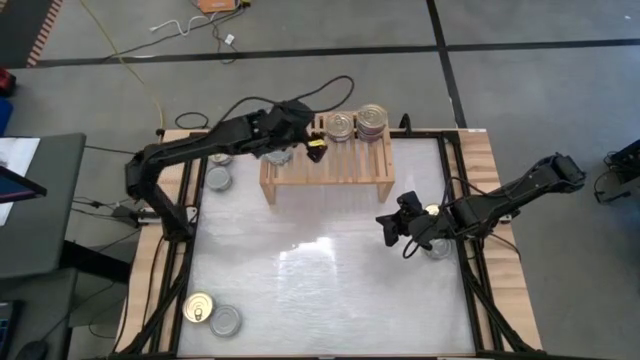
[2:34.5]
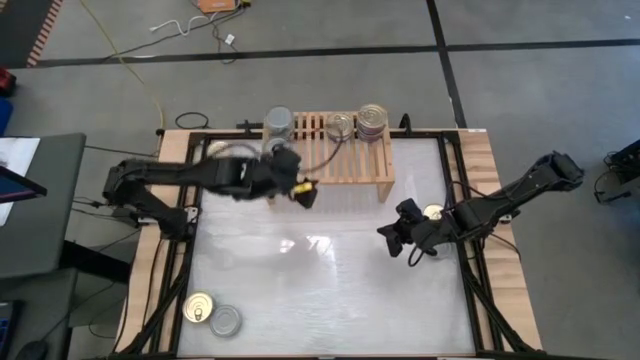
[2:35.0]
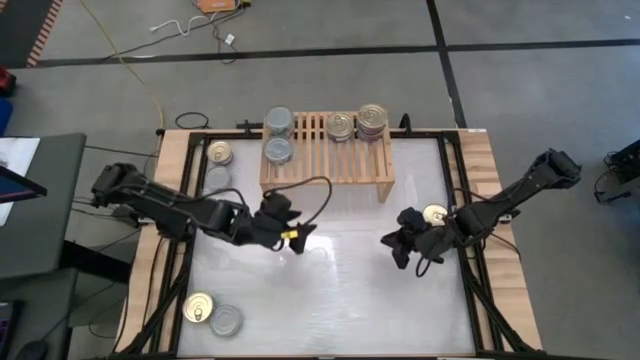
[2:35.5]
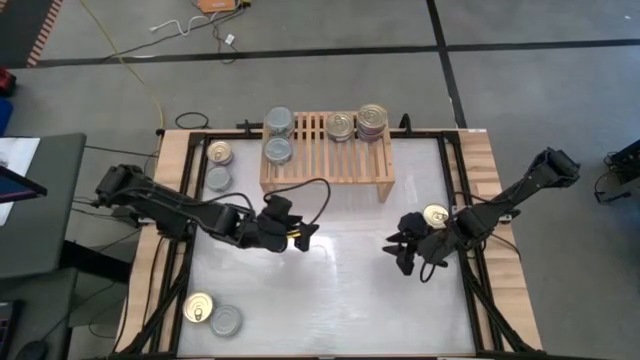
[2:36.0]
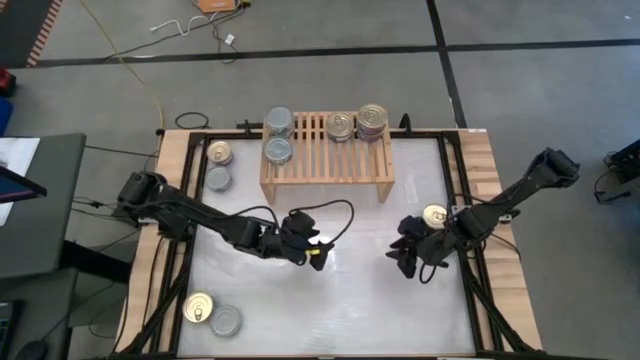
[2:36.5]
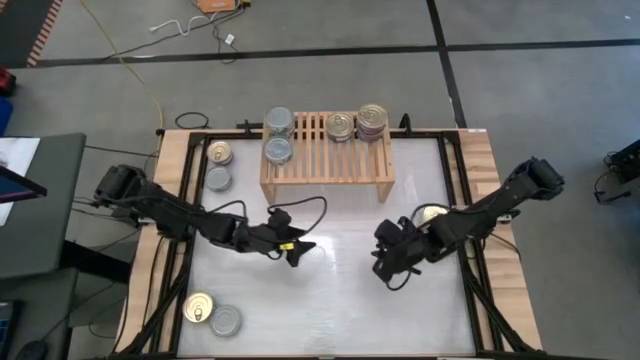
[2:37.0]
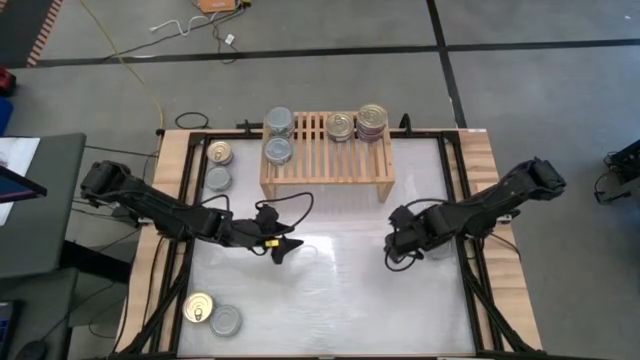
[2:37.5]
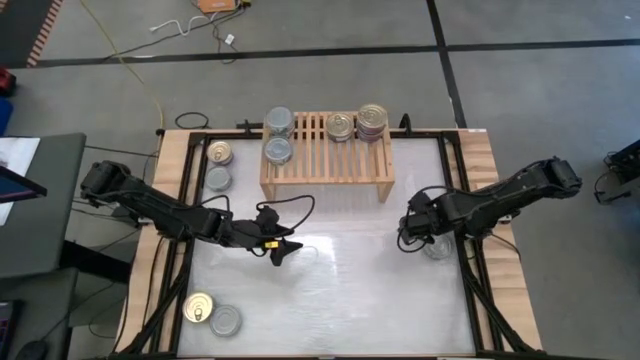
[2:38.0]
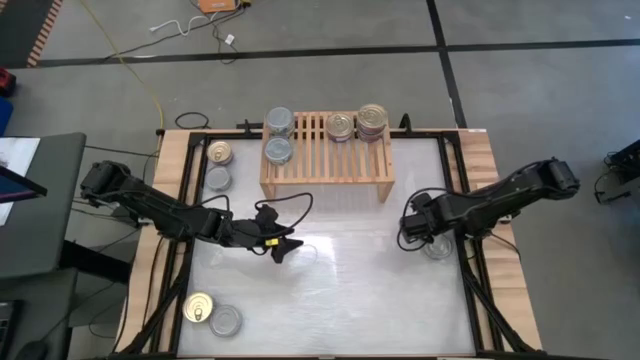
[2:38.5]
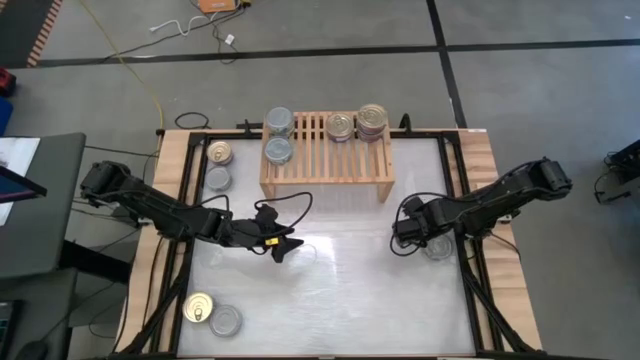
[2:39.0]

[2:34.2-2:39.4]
Task: Stack canned seafood by type on shelf
Move the blue tuna can to the center of the table

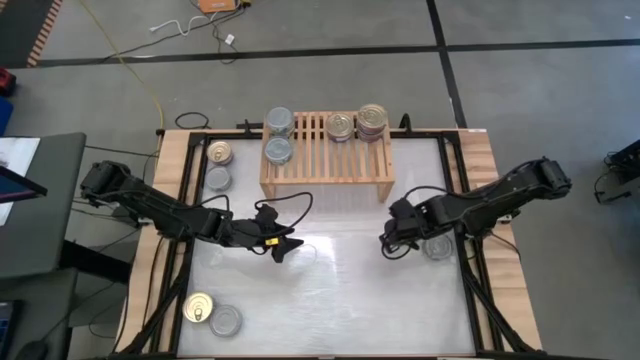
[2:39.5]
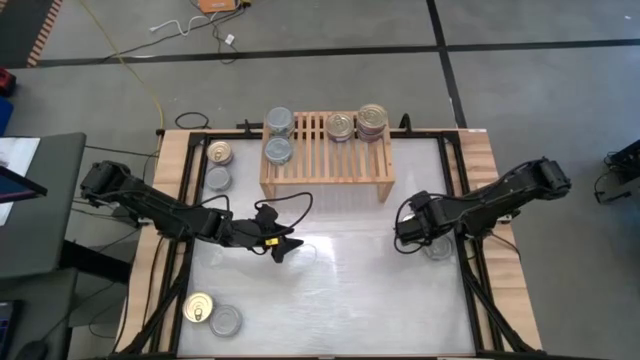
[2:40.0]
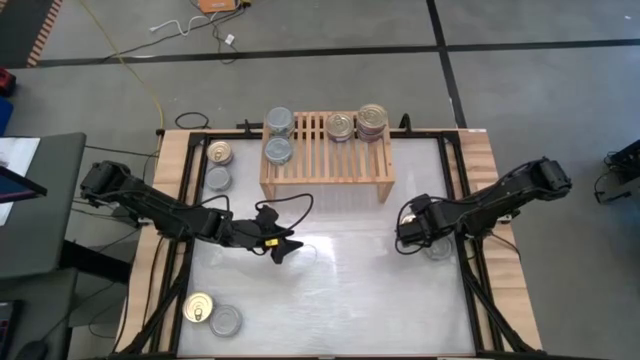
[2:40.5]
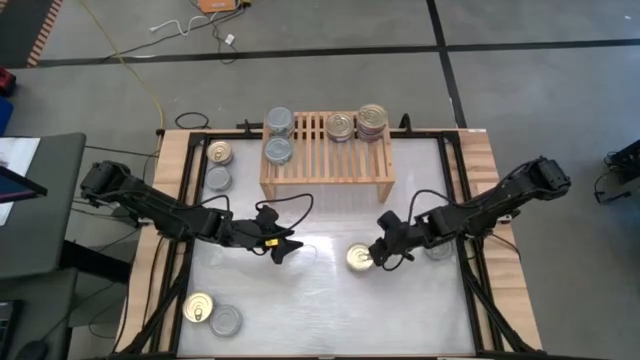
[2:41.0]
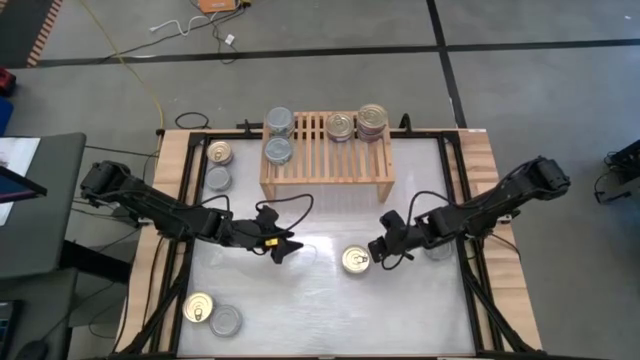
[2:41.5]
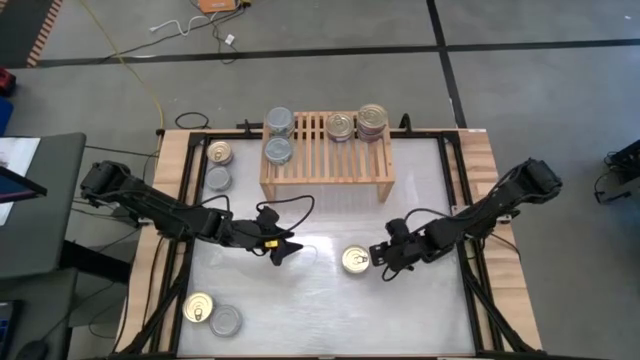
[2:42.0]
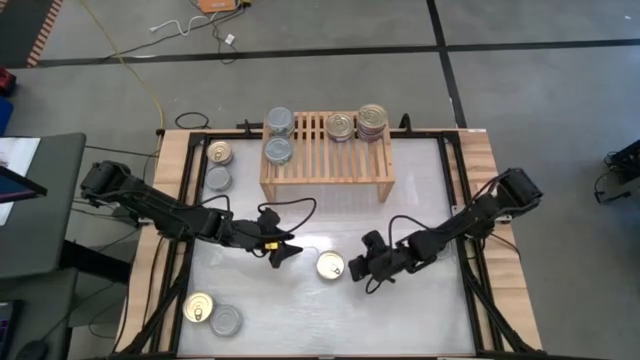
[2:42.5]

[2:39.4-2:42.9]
Move the blue tuna can to the center of the table

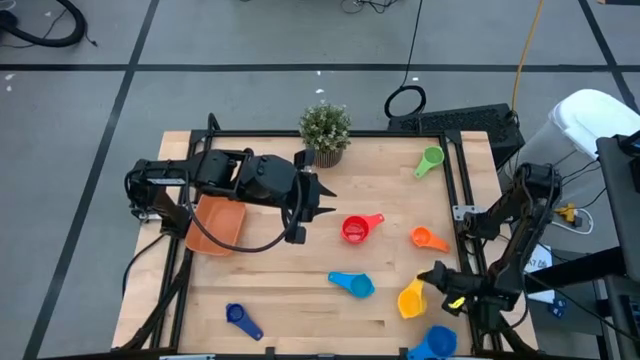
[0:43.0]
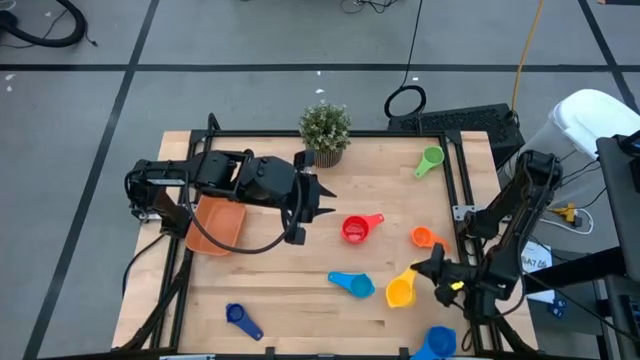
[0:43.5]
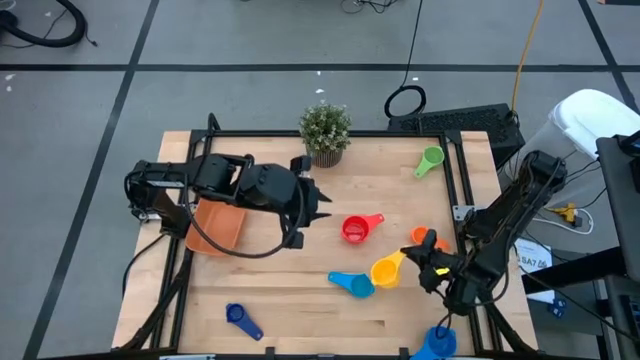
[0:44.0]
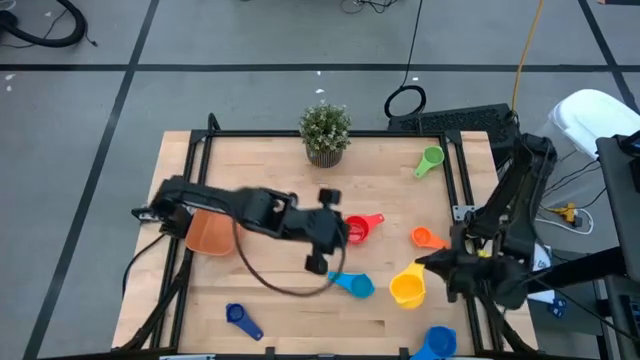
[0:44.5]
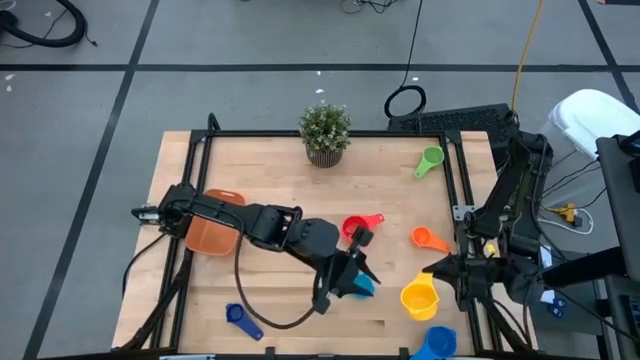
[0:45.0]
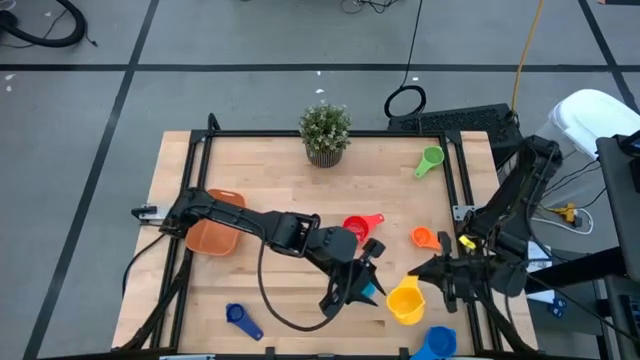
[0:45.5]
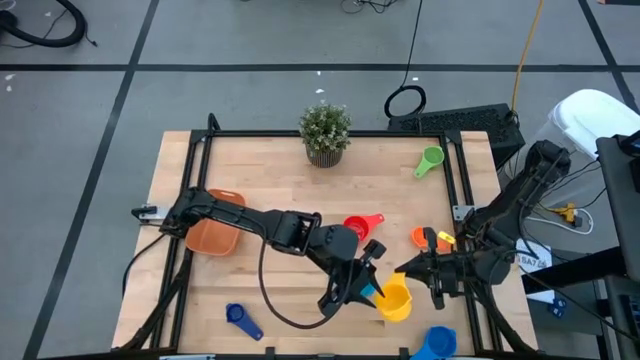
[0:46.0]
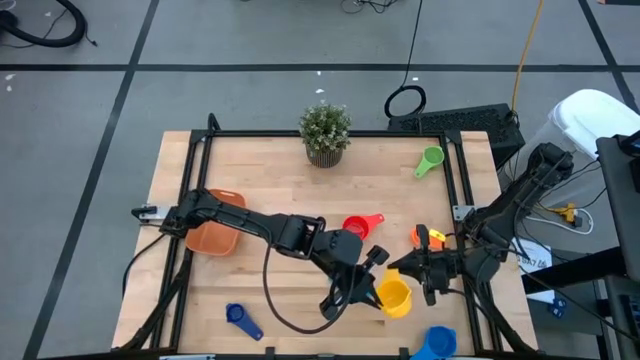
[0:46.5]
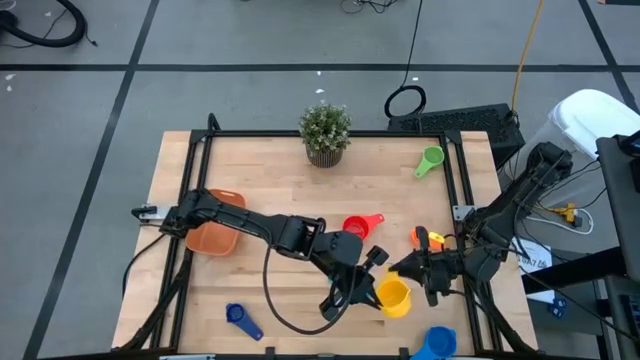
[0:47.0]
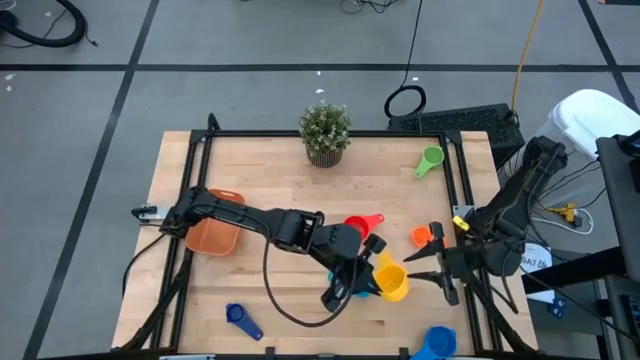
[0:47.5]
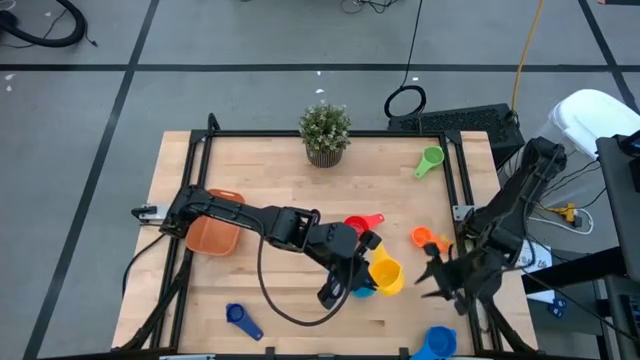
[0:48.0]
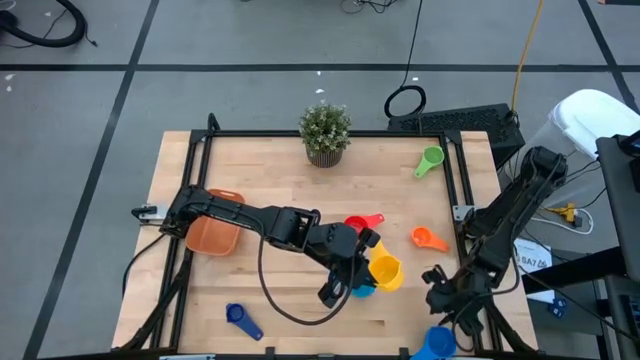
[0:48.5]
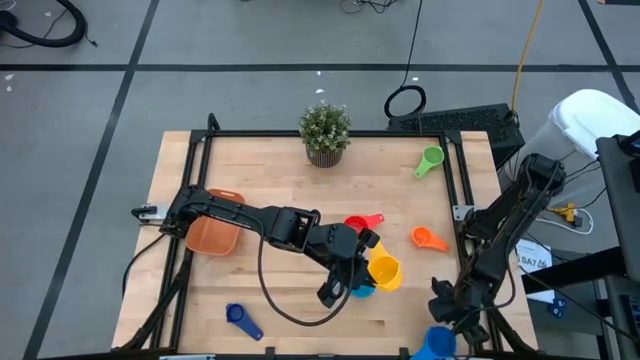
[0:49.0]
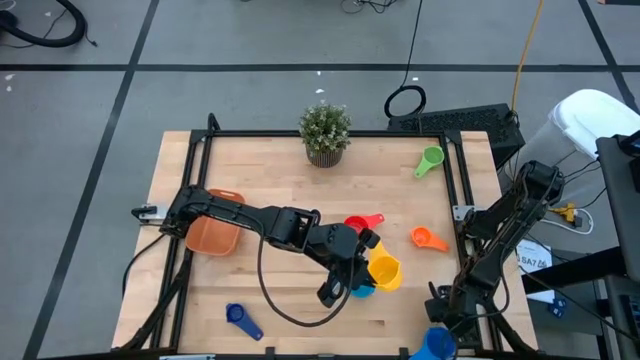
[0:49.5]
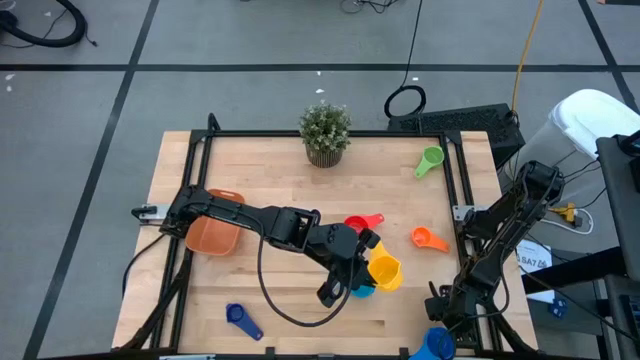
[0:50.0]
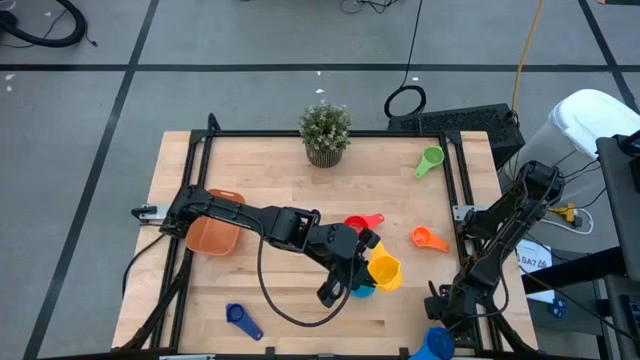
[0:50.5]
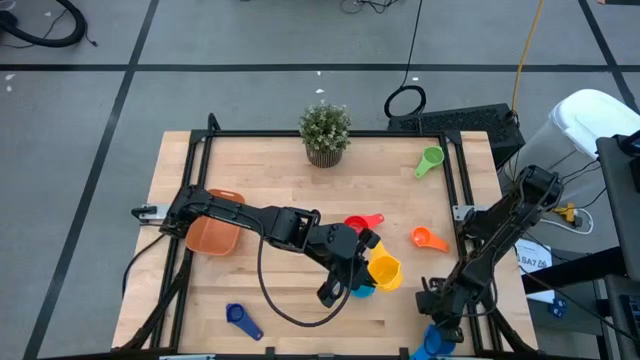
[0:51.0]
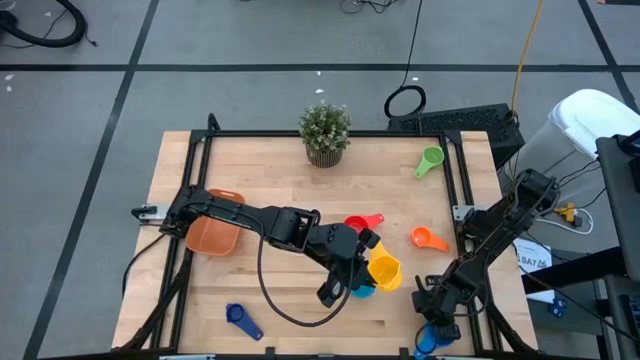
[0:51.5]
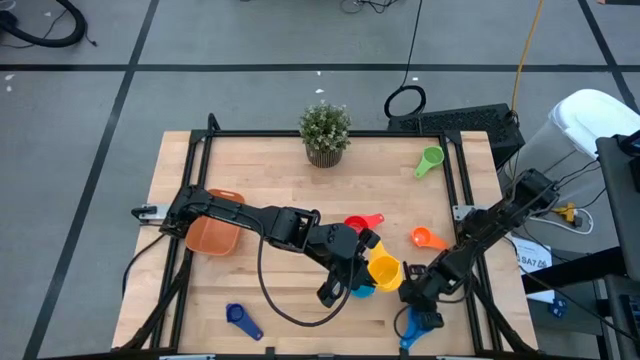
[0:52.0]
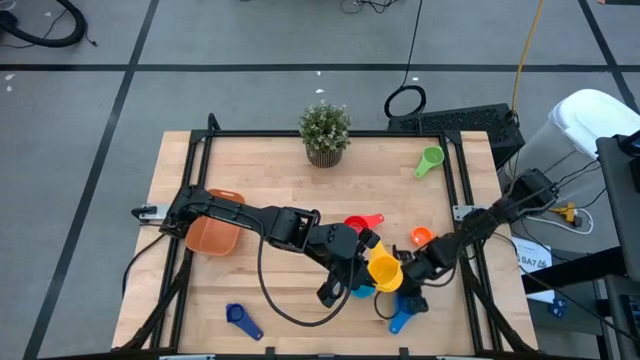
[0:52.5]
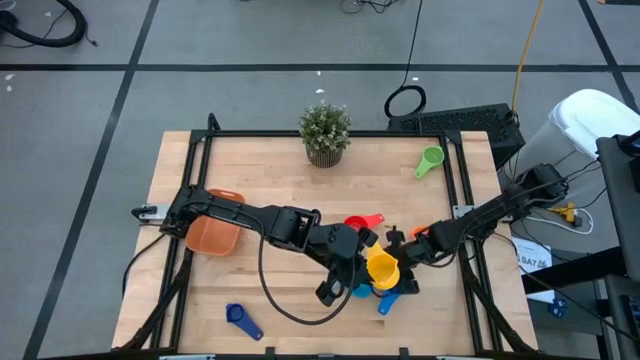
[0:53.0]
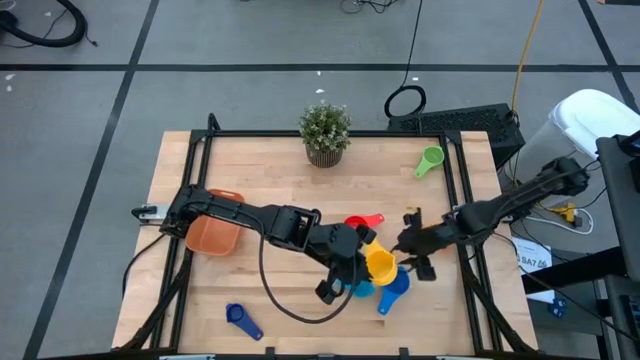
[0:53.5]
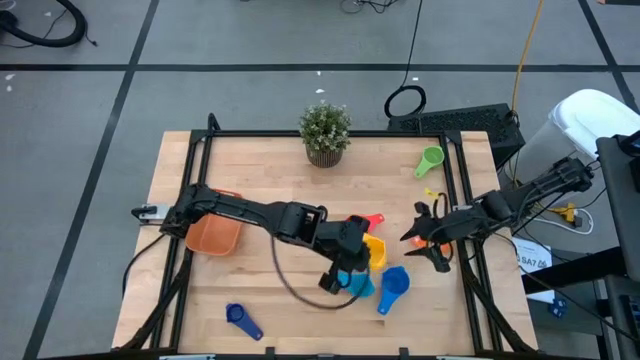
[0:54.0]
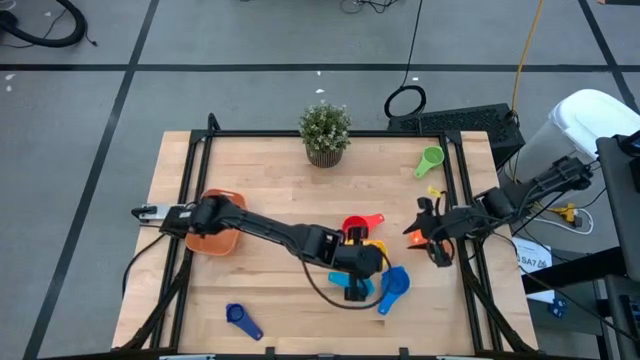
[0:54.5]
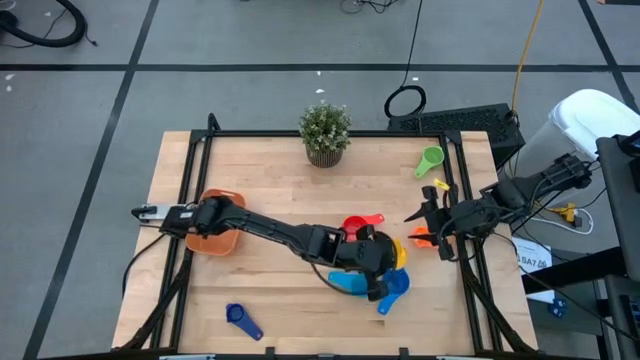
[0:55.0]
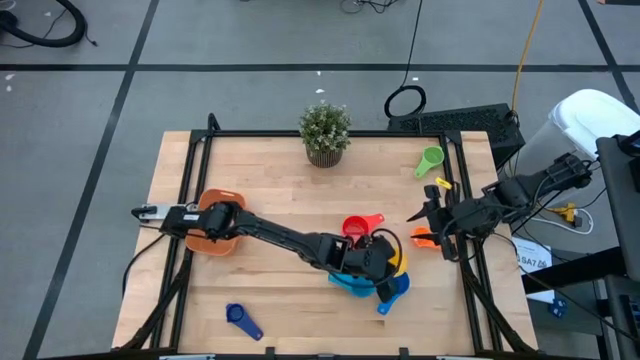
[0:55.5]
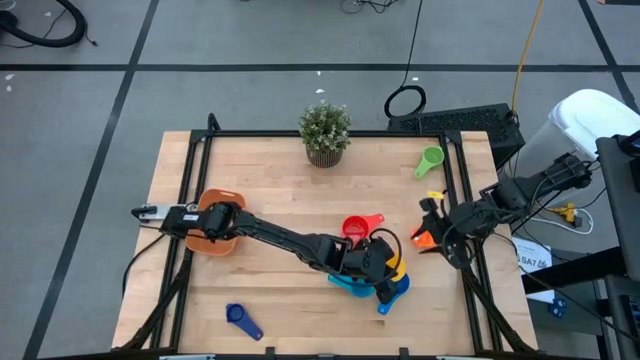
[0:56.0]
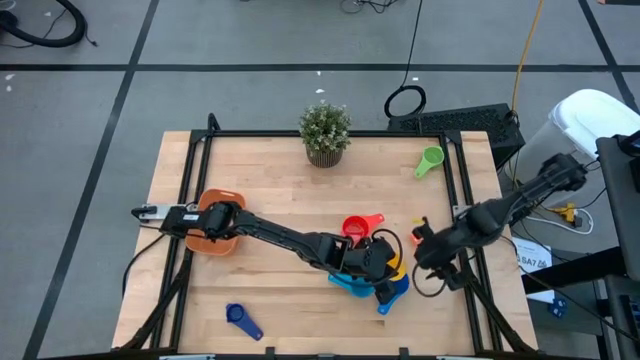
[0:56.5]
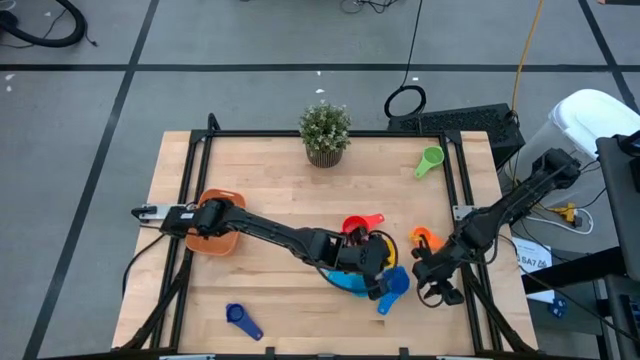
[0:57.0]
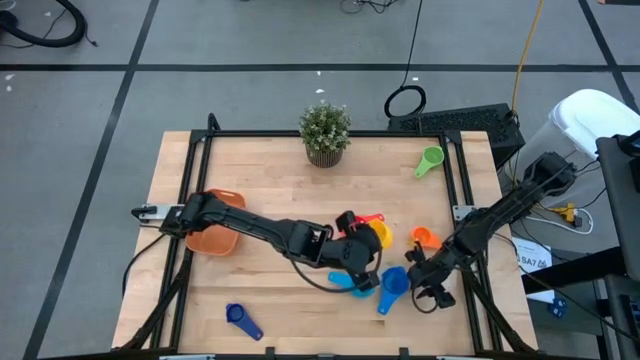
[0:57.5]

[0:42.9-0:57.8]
Task: Nest measuring cups in basket
Stack the yellow measuring cup on top of the blue measuring cup
